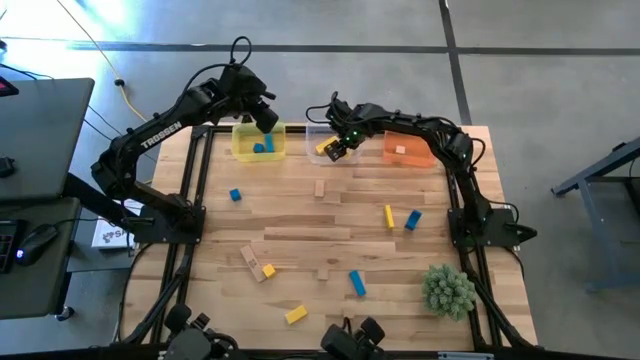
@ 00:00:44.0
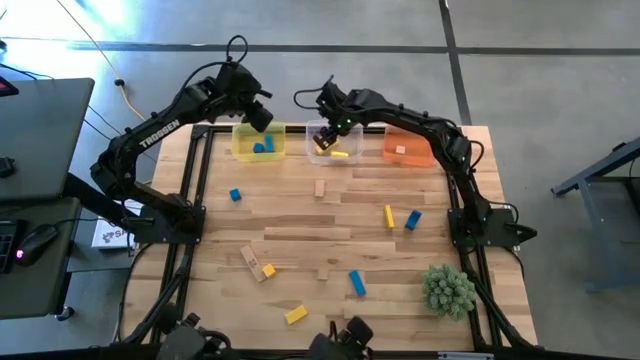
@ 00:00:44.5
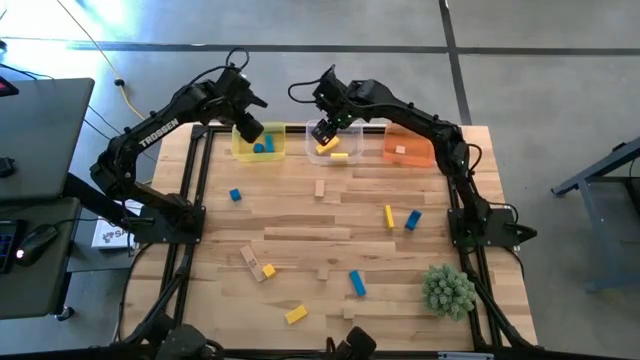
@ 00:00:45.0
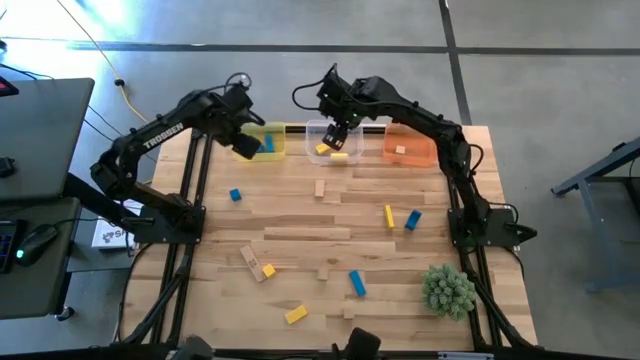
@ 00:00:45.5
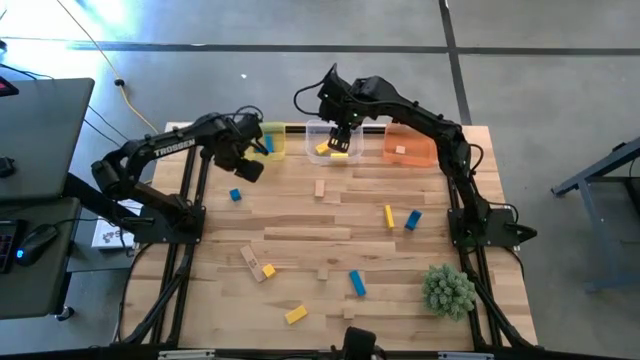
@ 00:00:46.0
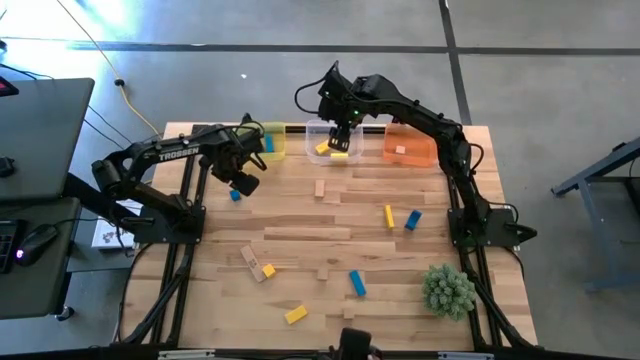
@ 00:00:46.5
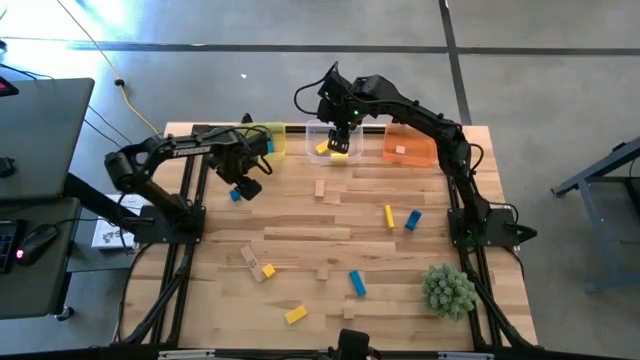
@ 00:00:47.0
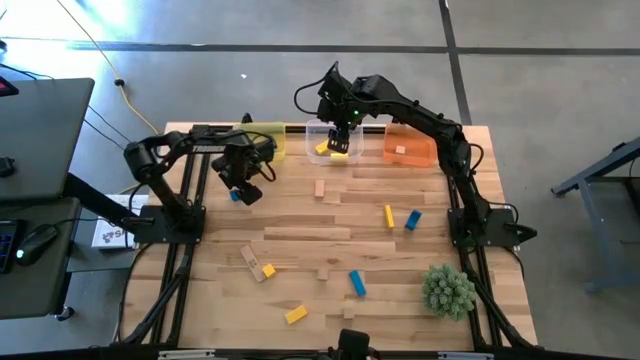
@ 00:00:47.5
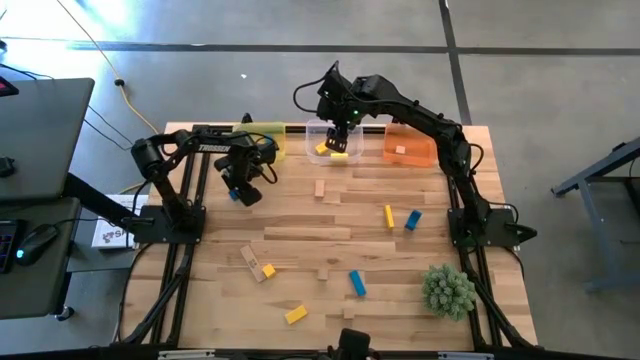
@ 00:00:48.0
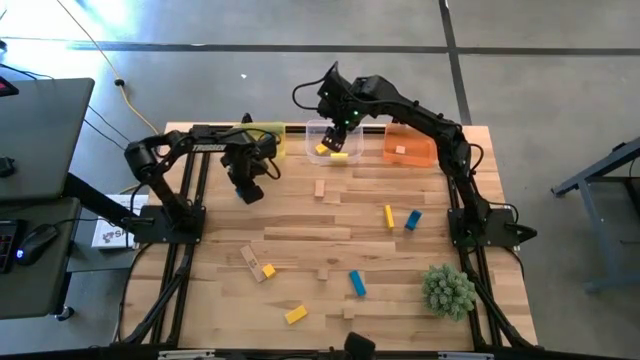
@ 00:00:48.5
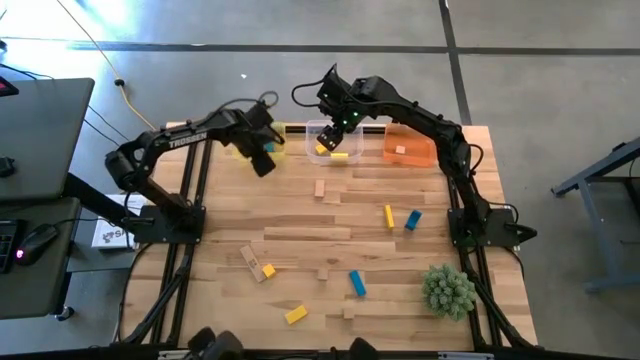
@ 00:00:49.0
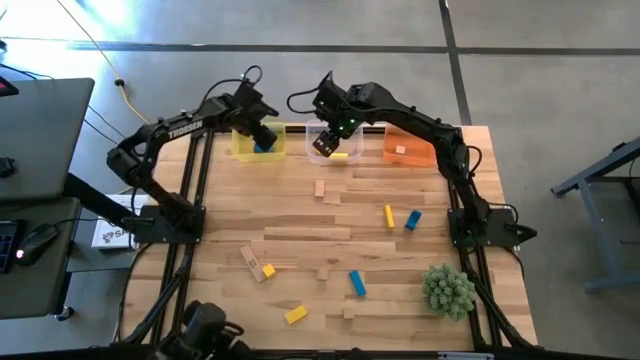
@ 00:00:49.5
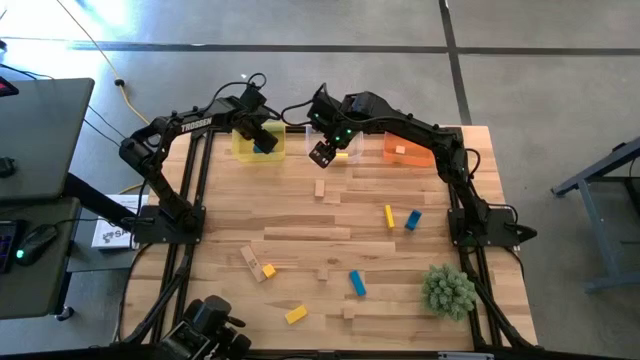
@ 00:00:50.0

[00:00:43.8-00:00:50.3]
Task: Sort & place blocks by color
Put the blue block into the yellow bin

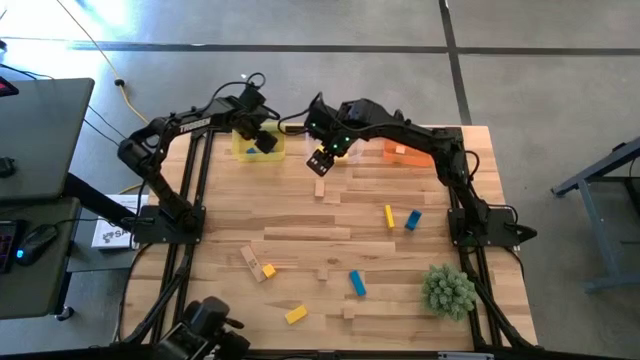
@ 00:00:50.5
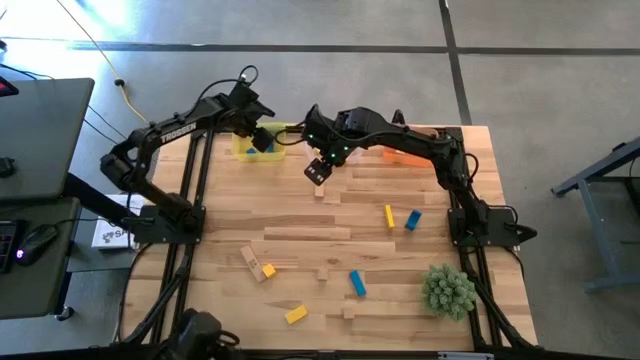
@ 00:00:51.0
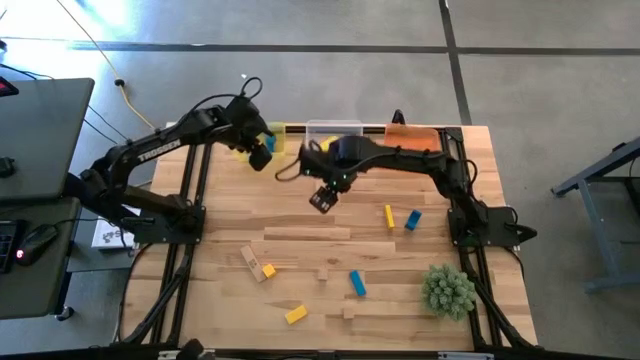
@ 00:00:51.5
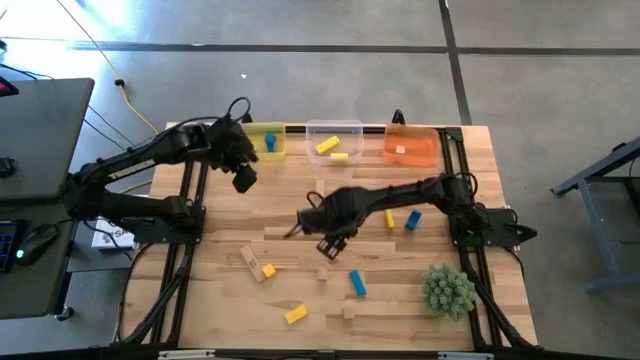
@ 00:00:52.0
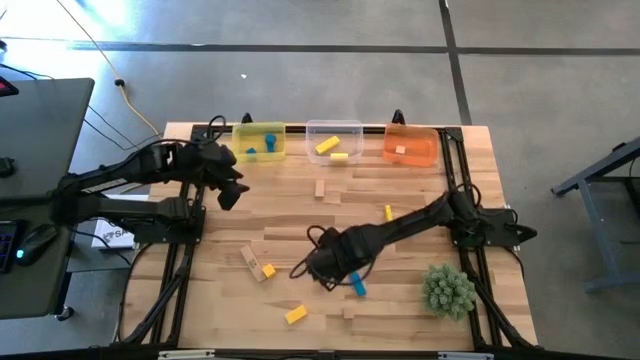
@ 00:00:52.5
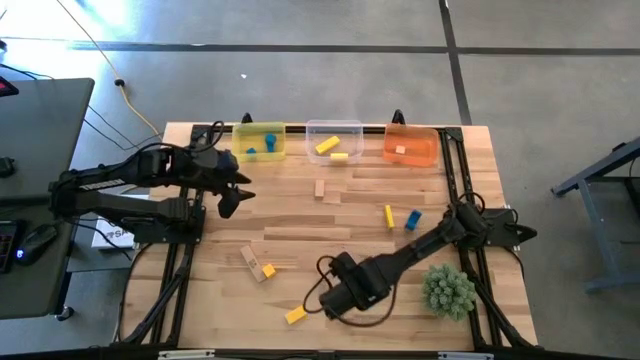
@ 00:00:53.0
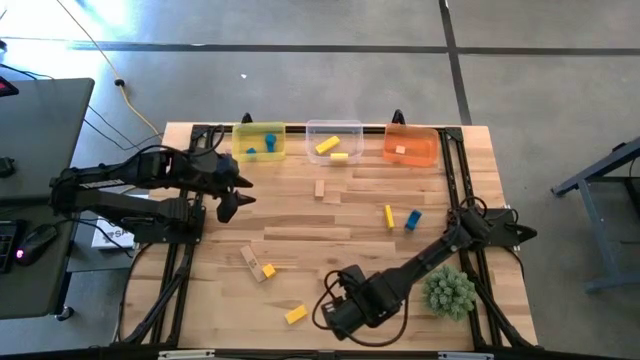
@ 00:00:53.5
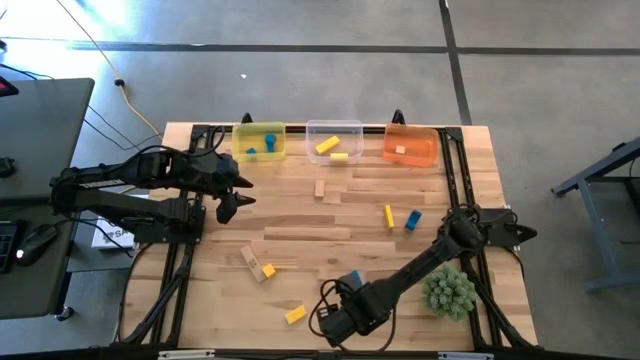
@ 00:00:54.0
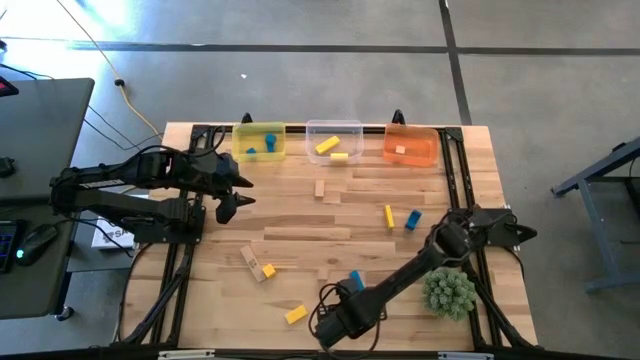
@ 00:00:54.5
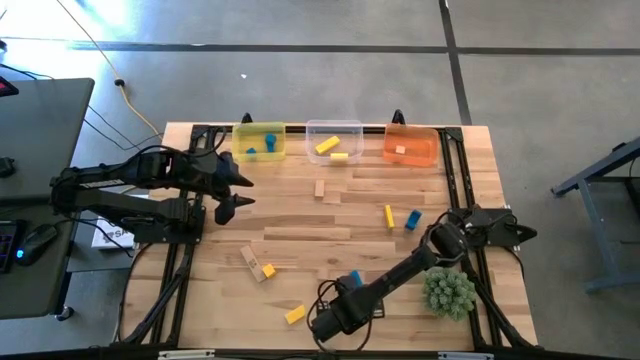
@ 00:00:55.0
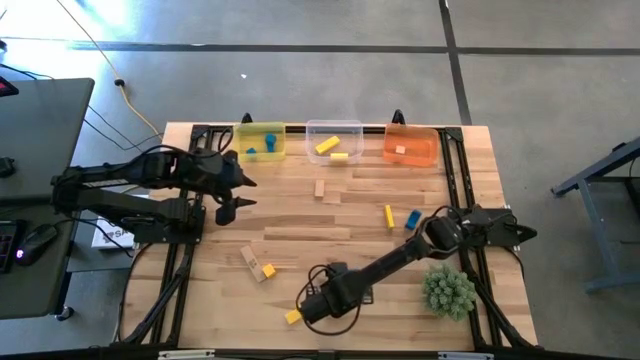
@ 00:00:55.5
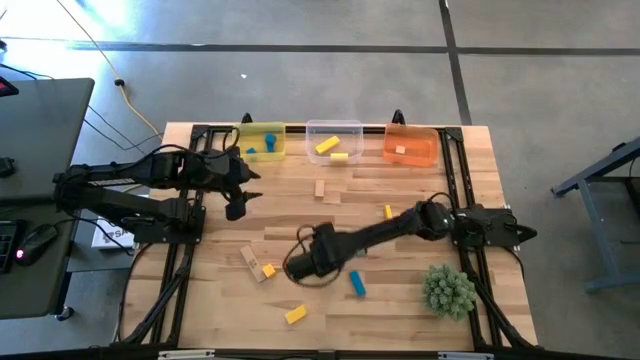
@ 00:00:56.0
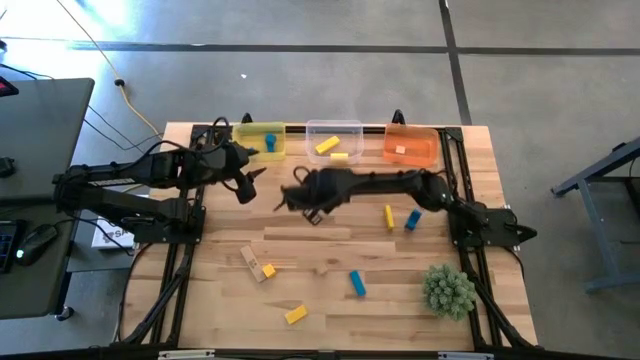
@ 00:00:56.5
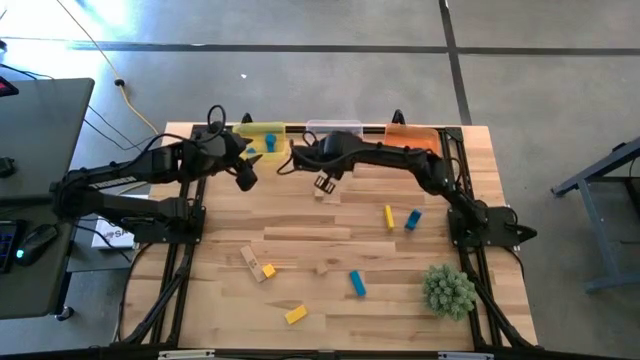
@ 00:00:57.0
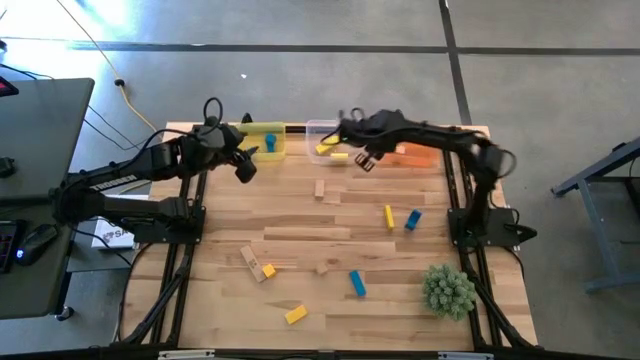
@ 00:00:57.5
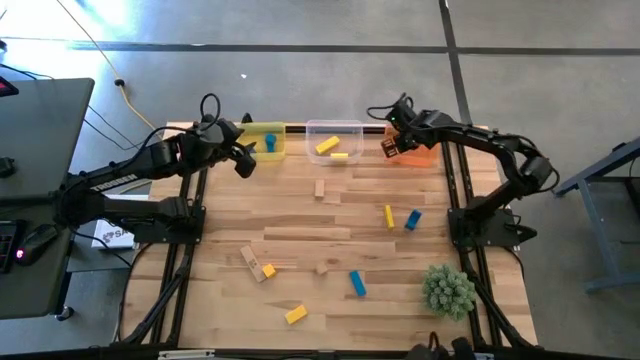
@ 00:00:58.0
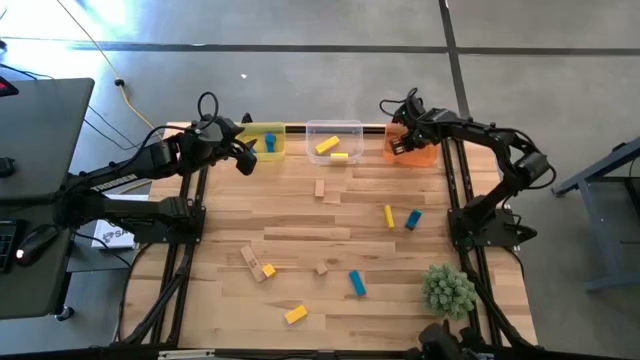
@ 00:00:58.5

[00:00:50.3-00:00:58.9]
Put the brown block into the orange bin

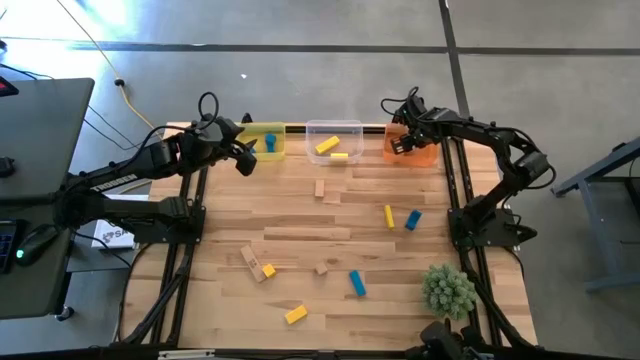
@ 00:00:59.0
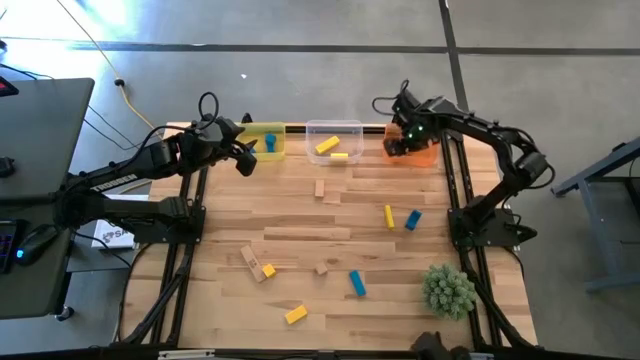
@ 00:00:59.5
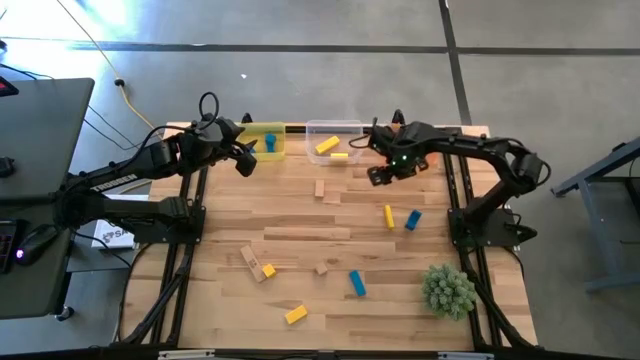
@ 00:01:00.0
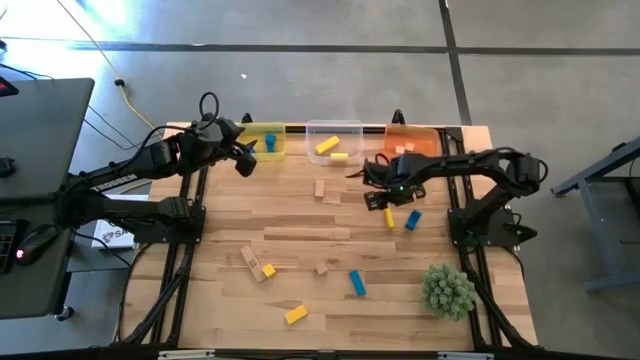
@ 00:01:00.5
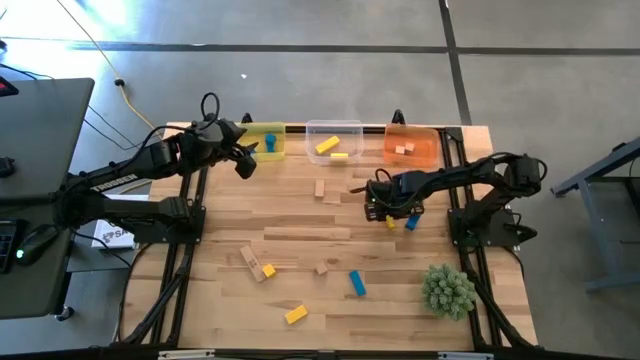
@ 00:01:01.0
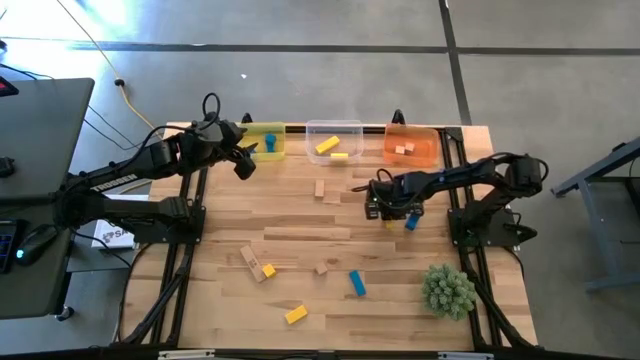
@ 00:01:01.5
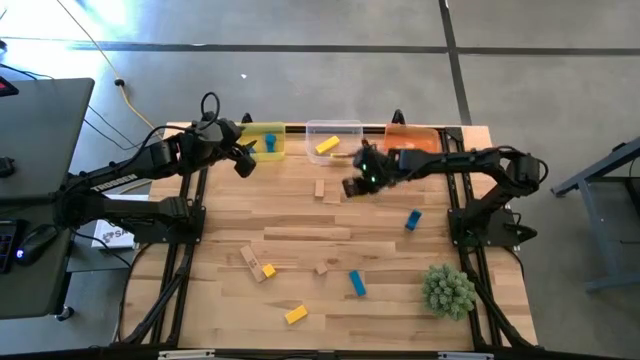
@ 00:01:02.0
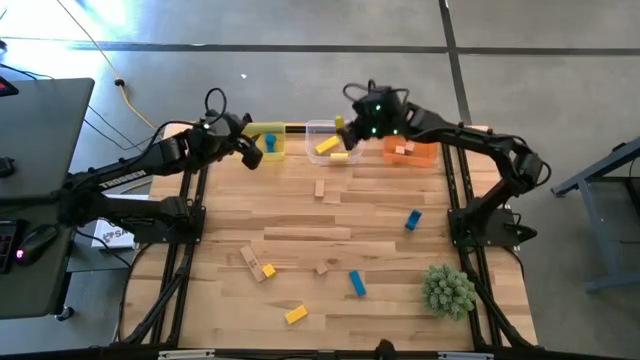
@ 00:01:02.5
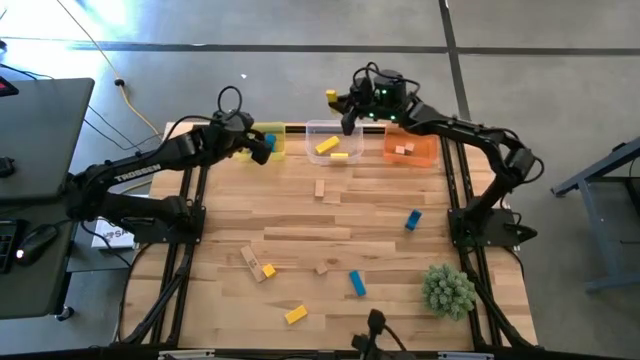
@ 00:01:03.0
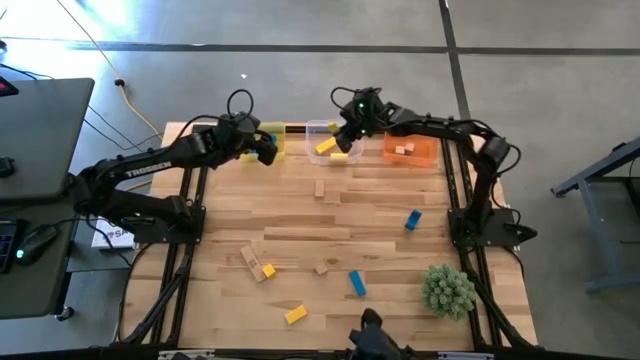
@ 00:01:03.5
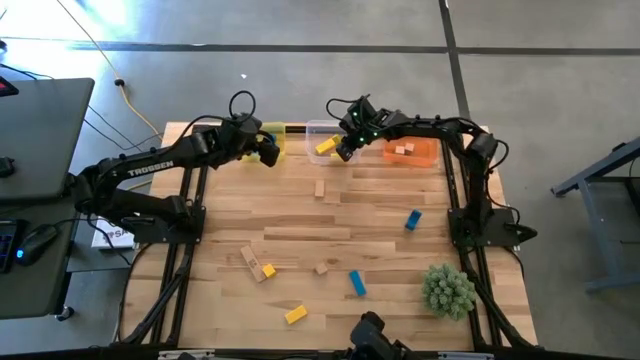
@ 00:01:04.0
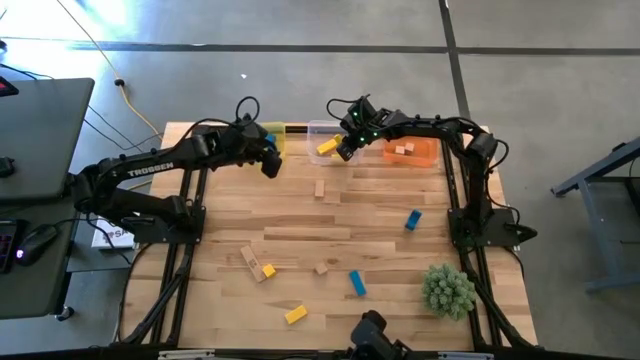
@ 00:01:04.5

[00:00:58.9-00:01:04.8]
Put the yellow block into the transparent bin
